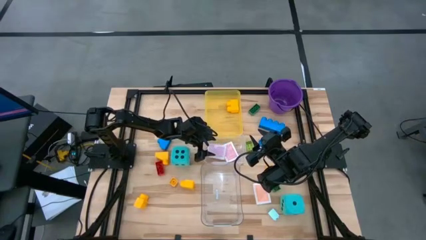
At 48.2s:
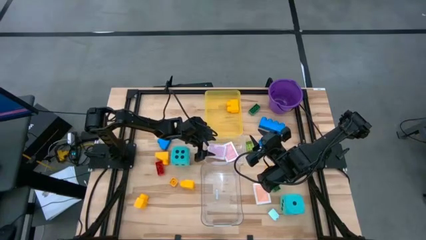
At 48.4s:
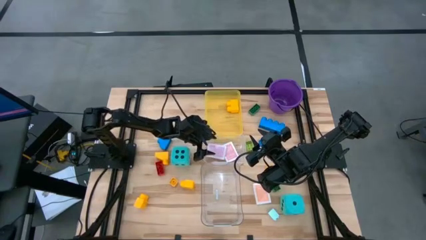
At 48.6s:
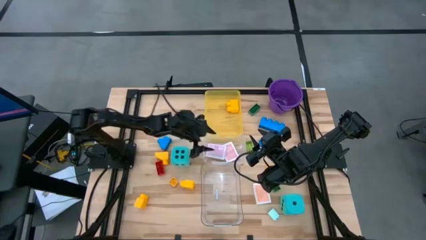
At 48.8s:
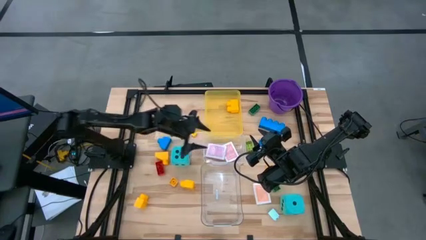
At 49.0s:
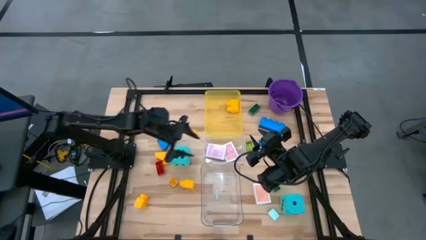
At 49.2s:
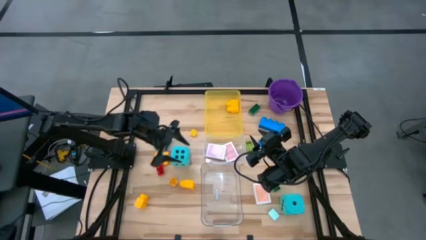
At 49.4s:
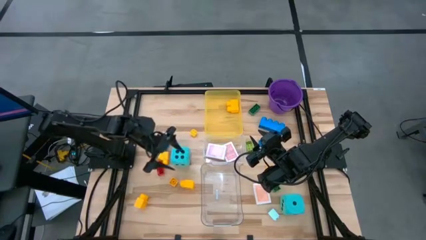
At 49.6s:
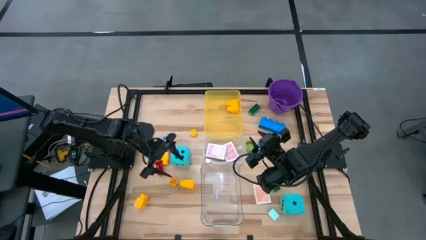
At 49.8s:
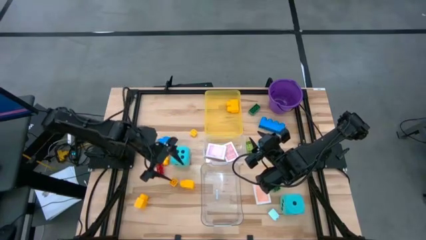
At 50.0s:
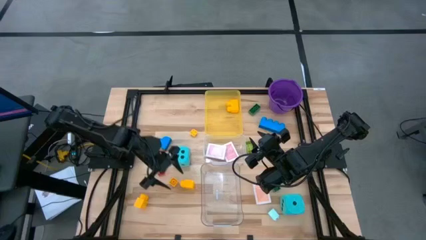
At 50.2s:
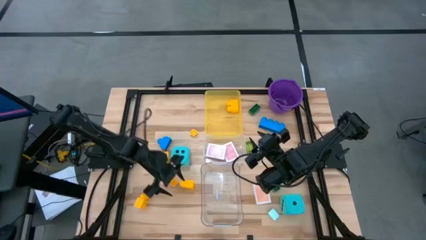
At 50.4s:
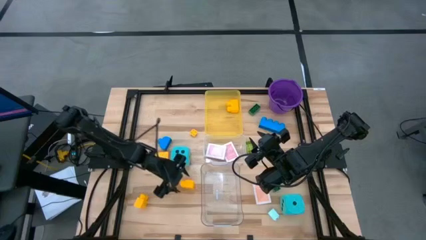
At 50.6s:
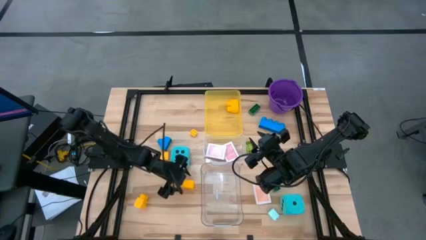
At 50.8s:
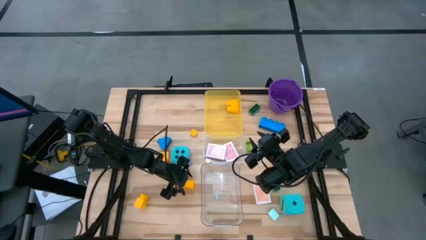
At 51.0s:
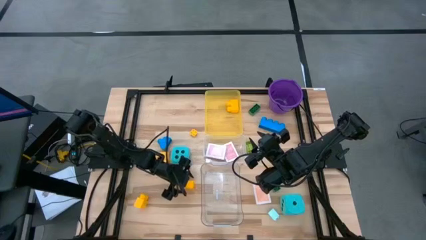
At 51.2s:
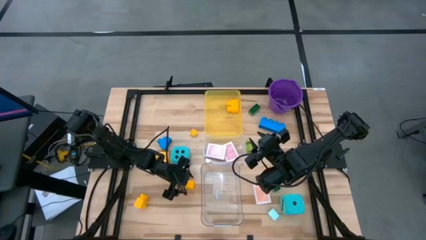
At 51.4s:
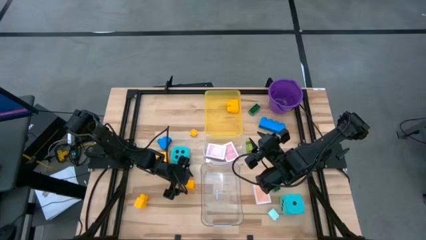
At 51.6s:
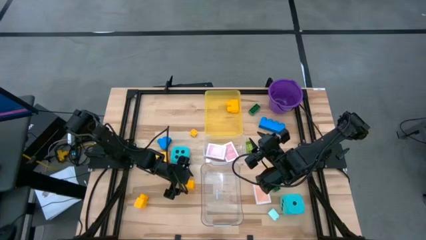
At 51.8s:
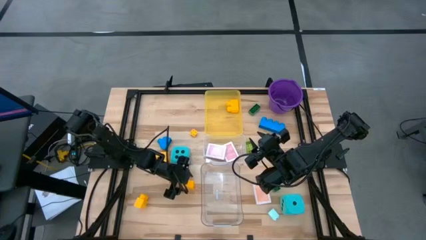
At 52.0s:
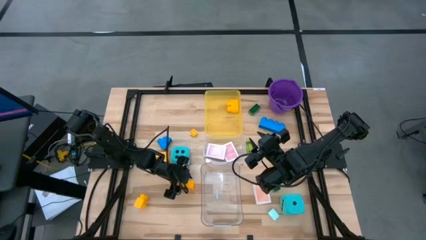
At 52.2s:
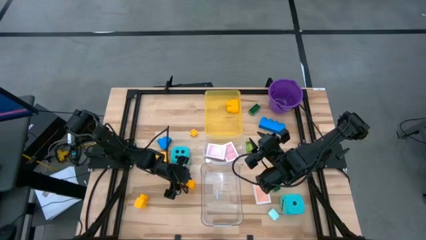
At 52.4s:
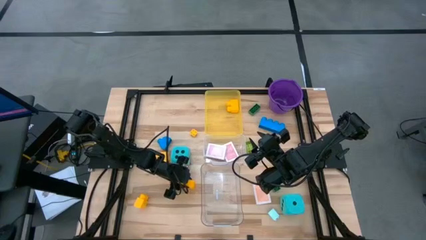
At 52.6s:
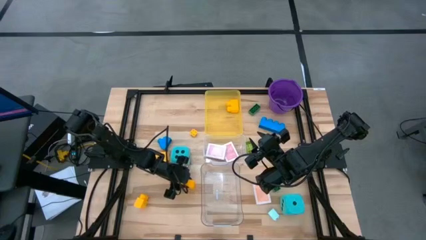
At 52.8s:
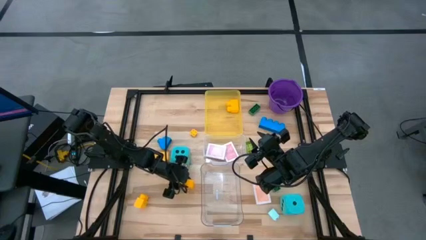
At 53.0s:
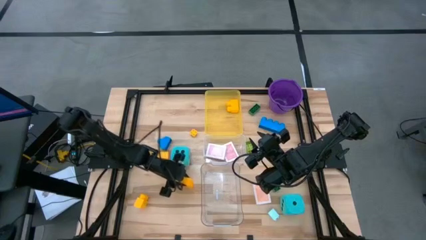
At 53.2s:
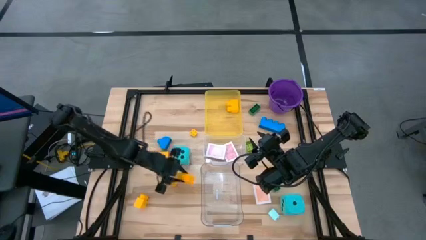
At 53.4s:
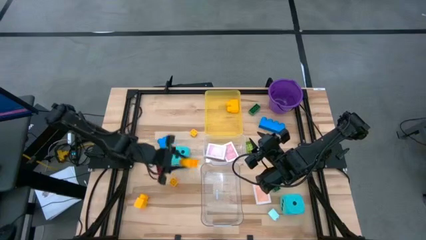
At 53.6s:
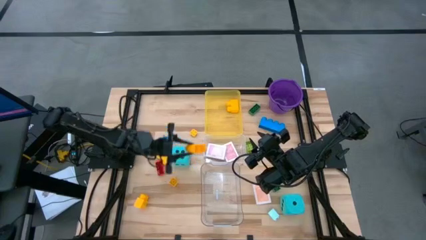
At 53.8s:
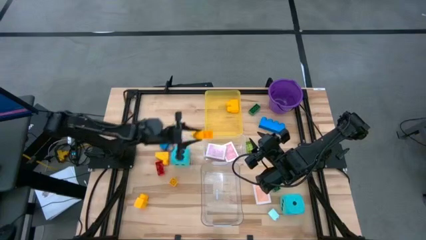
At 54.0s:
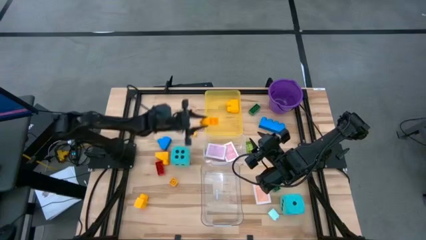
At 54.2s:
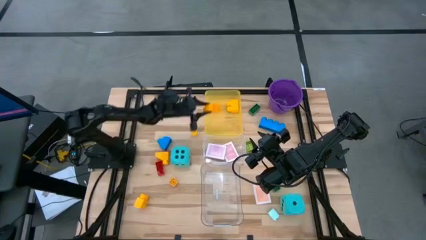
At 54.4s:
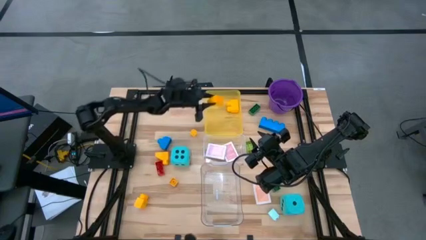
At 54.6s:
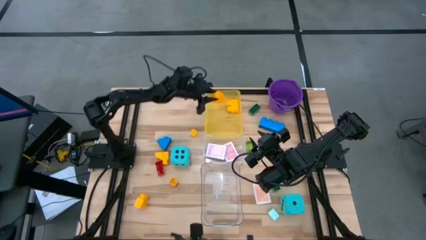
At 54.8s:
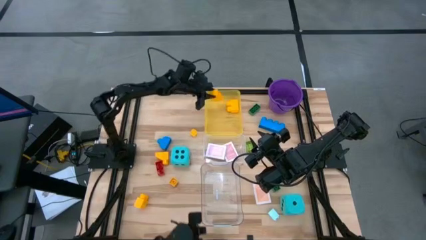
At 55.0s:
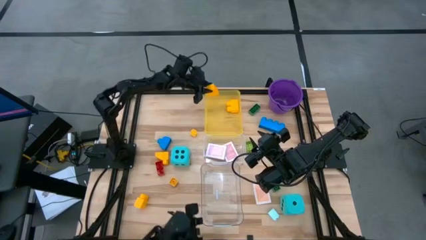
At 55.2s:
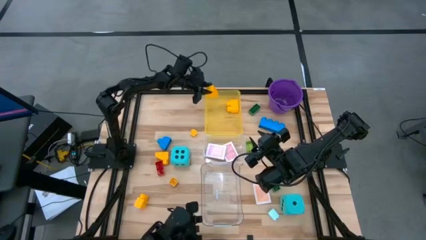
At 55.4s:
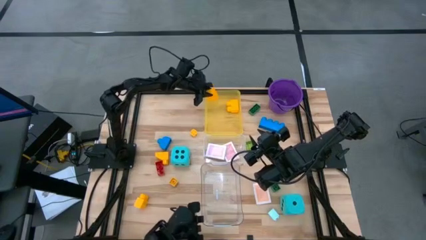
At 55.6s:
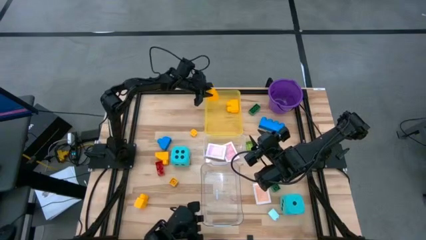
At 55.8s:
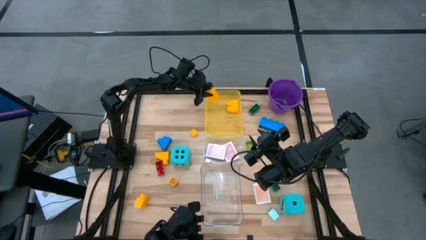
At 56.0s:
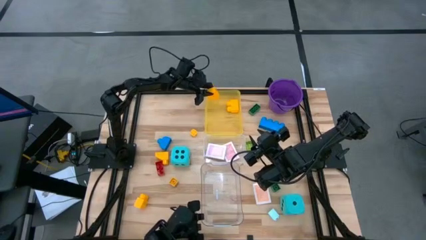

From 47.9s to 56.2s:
Task: Pick & Place Toys
Put the yellow game piece into the yellow bin

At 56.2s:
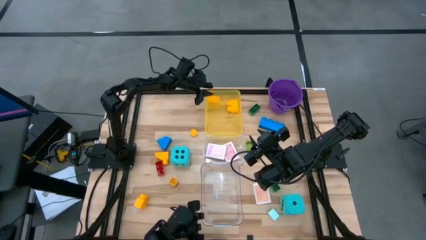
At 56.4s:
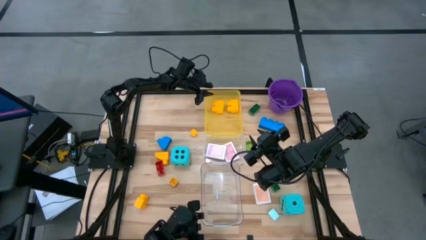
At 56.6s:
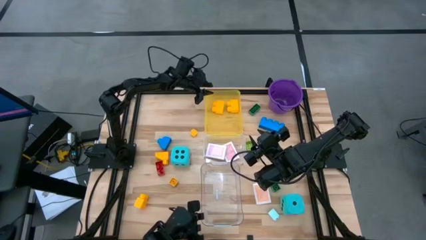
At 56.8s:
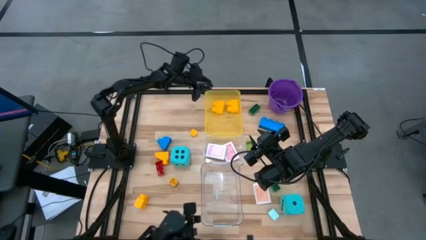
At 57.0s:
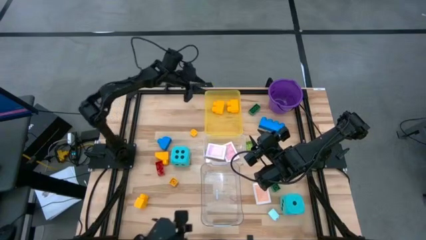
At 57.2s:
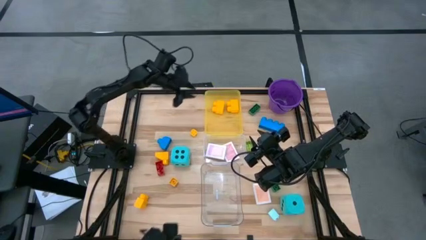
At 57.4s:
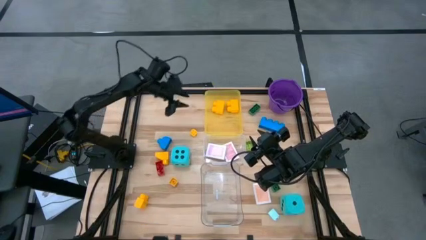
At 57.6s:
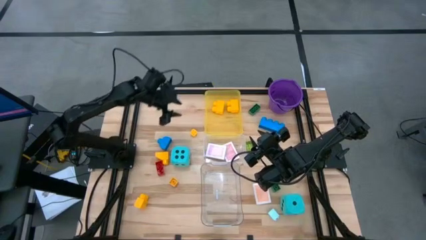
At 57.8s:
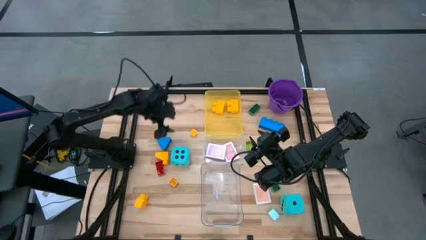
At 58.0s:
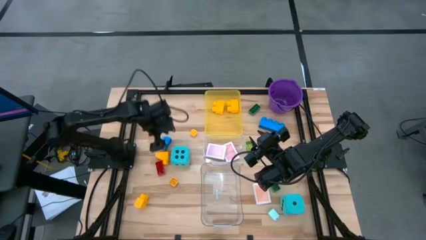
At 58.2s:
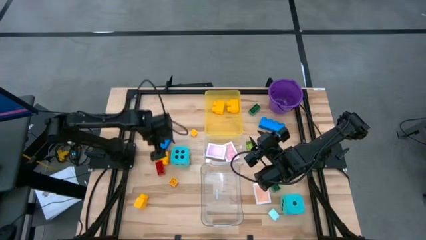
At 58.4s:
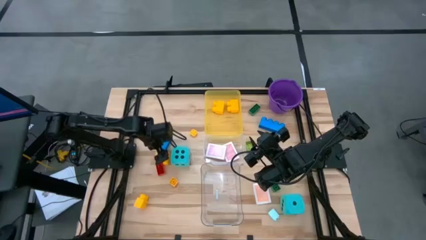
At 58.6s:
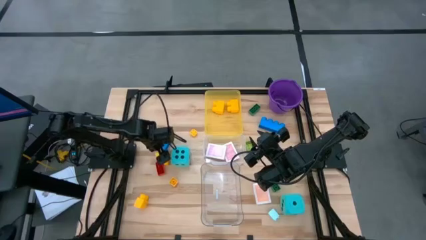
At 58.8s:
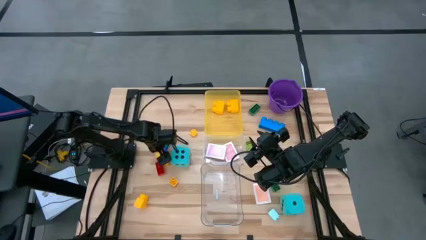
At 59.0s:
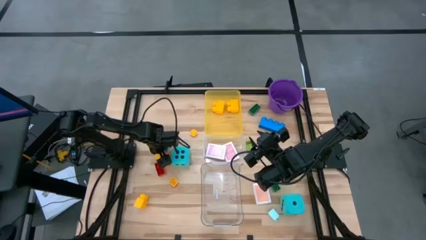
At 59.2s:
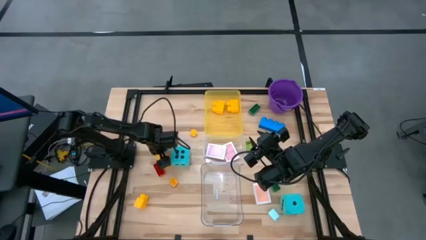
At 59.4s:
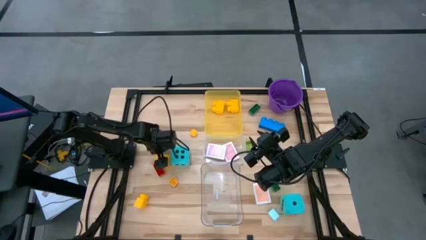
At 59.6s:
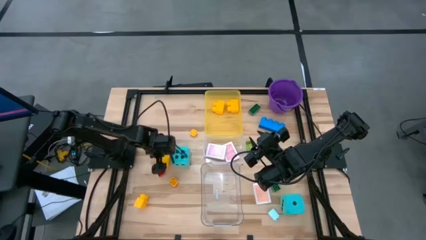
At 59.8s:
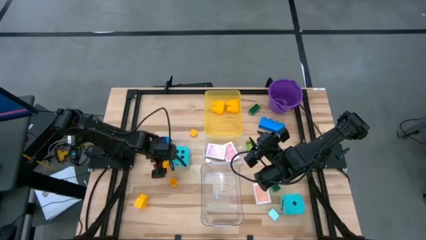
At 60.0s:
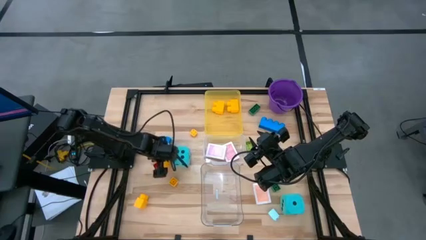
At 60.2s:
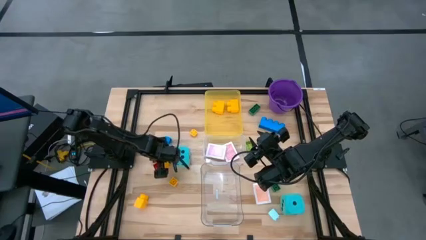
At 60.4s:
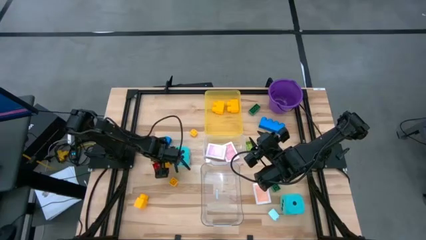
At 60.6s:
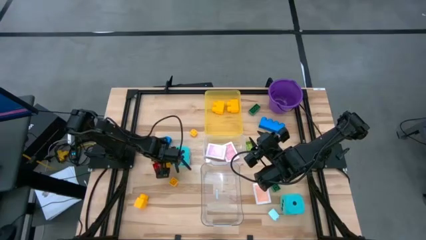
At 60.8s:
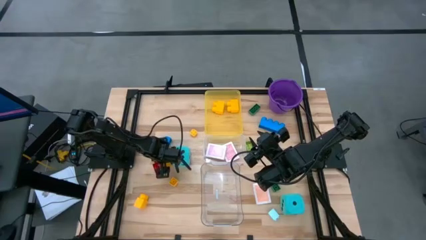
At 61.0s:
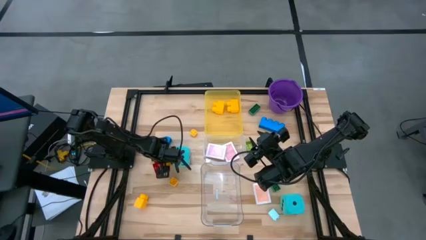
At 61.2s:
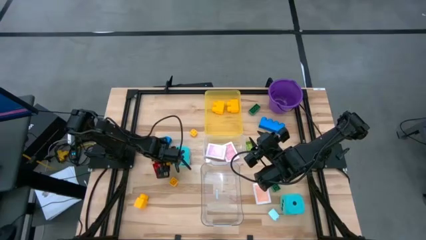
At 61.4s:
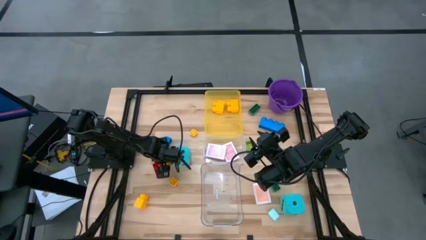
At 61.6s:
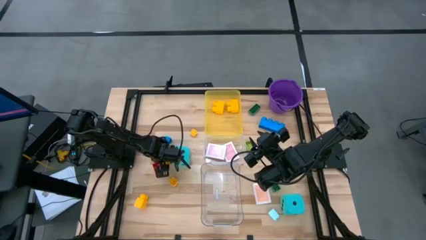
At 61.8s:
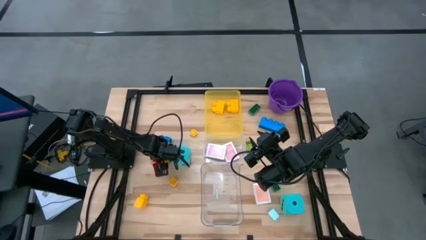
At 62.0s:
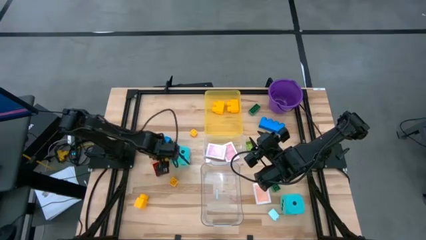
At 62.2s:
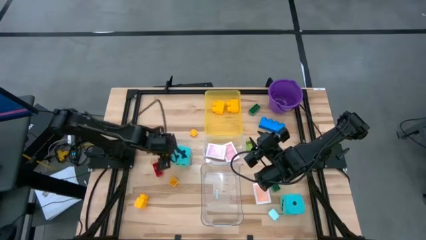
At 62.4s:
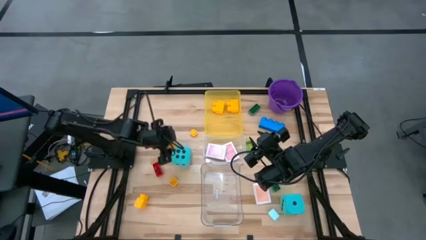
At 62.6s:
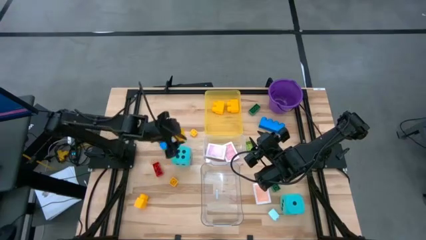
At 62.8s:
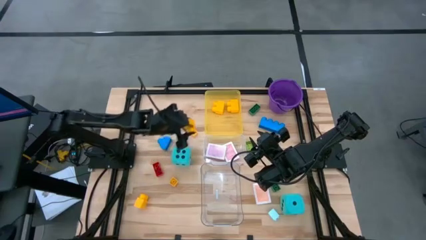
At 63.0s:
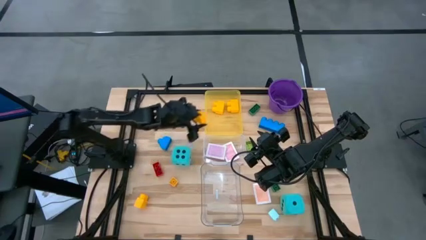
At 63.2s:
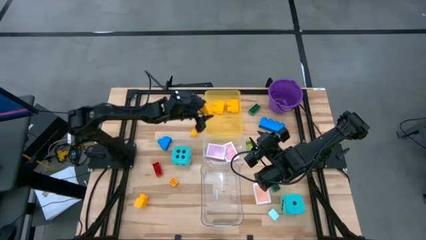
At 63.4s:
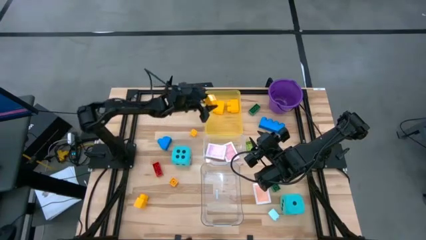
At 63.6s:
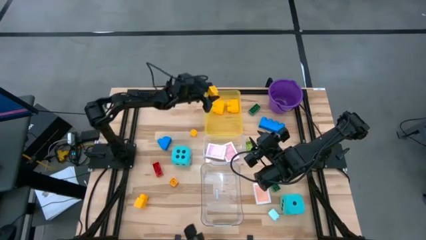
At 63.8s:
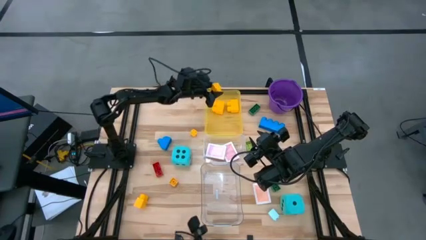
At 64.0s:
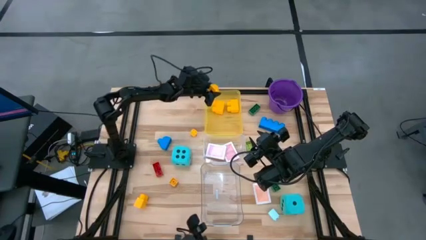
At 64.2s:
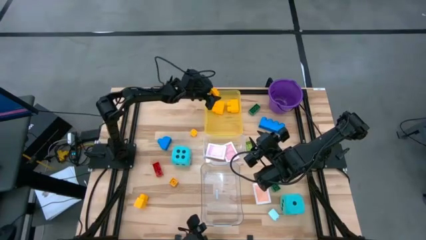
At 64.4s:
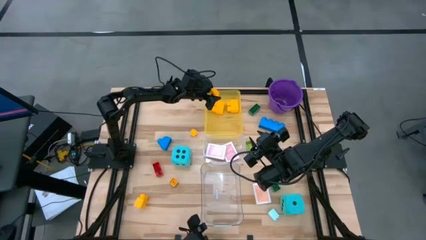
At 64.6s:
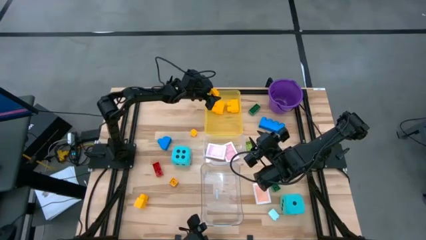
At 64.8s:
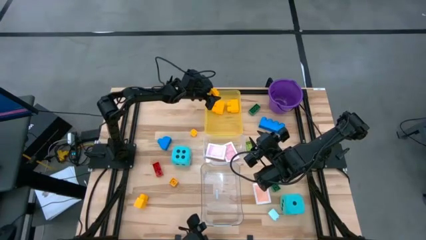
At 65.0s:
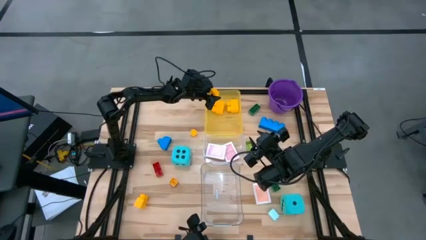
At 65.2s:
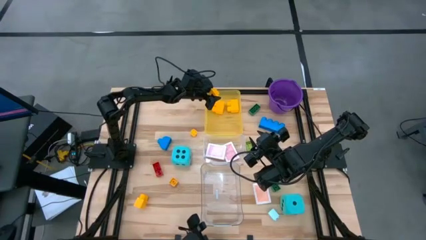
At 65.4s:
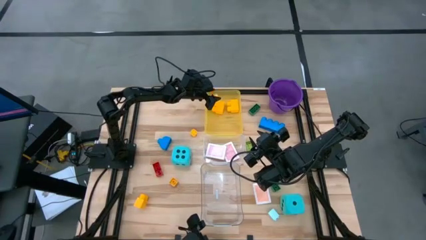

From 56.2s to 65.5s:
Put the yellow game piece into the yellow bin
